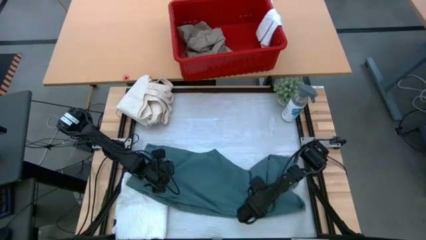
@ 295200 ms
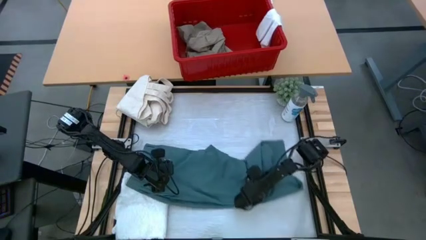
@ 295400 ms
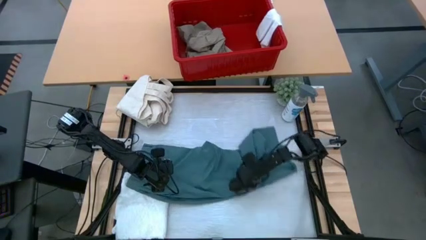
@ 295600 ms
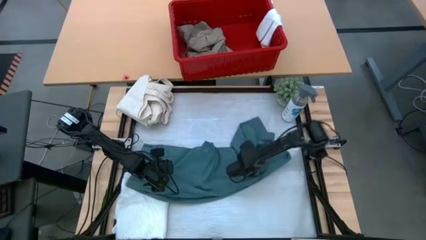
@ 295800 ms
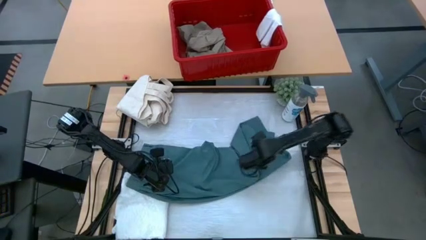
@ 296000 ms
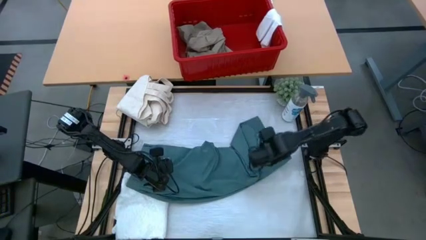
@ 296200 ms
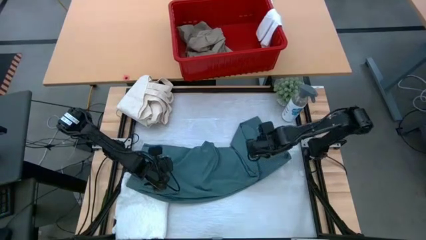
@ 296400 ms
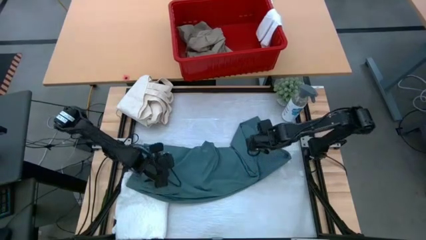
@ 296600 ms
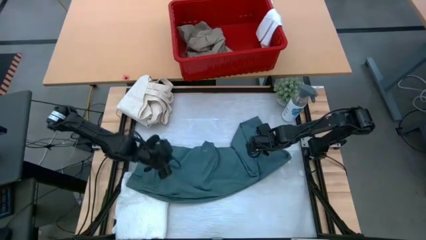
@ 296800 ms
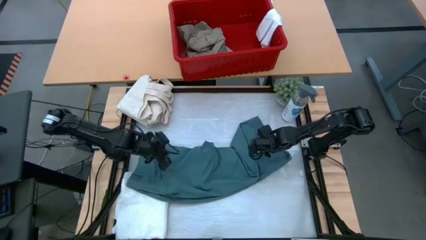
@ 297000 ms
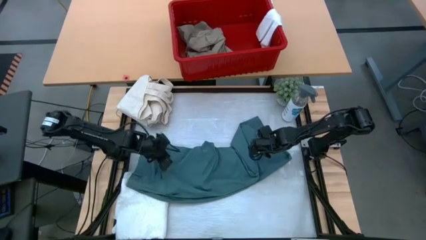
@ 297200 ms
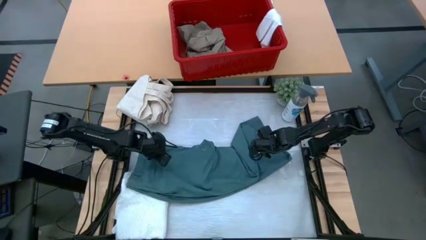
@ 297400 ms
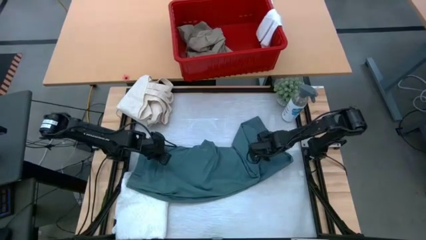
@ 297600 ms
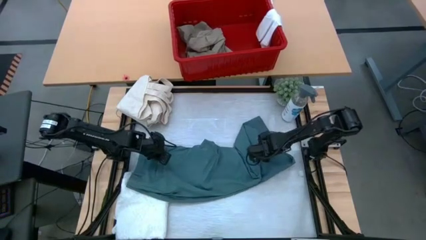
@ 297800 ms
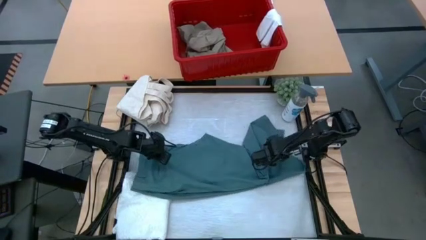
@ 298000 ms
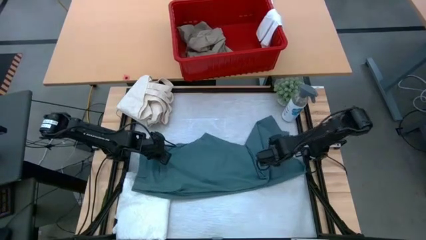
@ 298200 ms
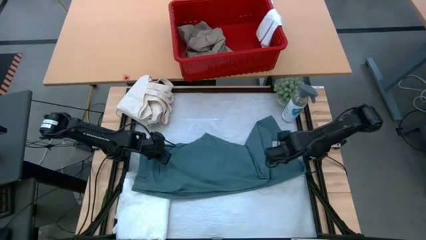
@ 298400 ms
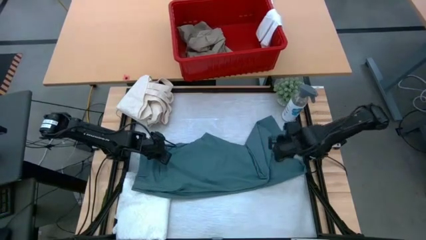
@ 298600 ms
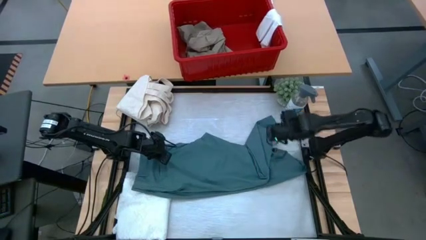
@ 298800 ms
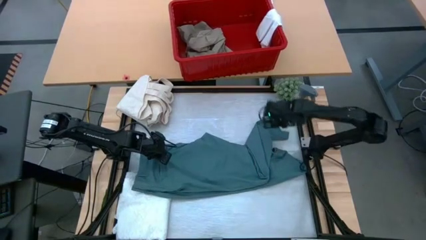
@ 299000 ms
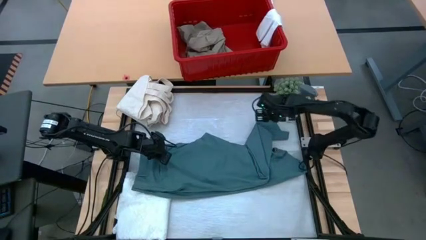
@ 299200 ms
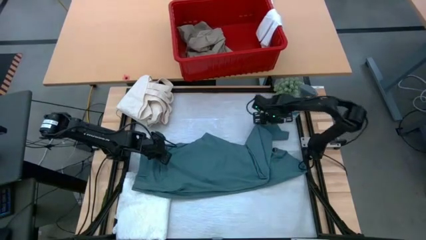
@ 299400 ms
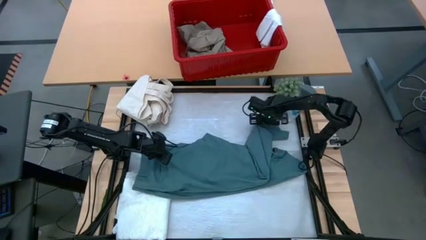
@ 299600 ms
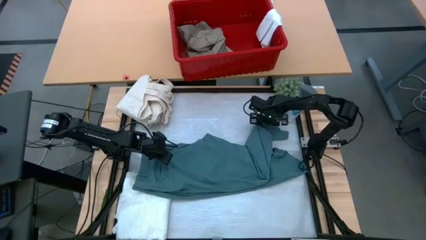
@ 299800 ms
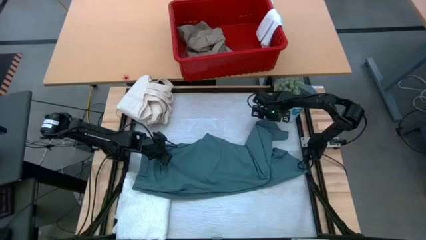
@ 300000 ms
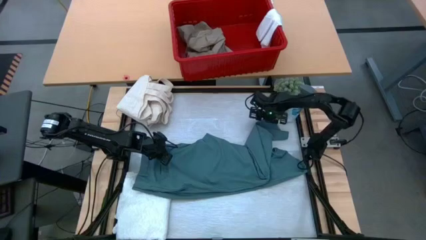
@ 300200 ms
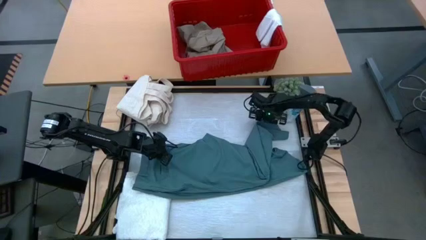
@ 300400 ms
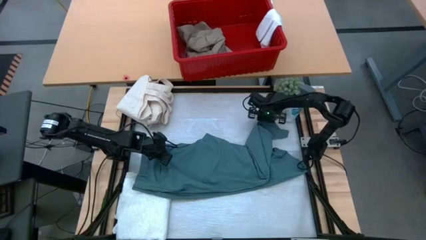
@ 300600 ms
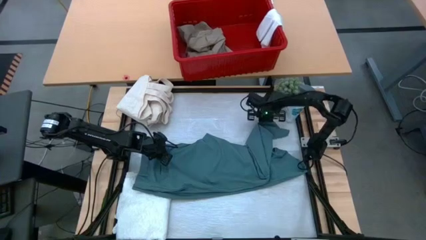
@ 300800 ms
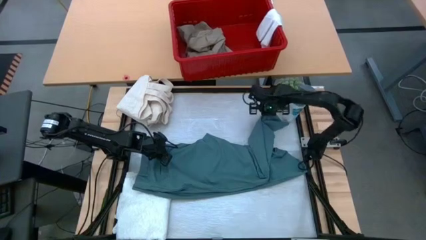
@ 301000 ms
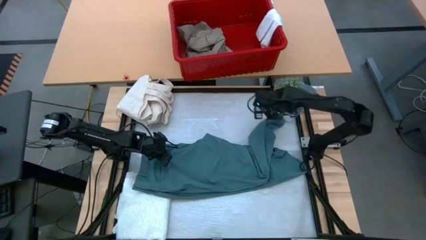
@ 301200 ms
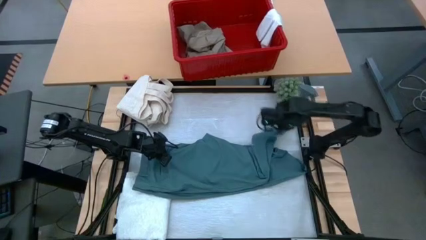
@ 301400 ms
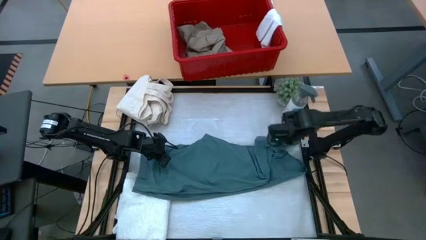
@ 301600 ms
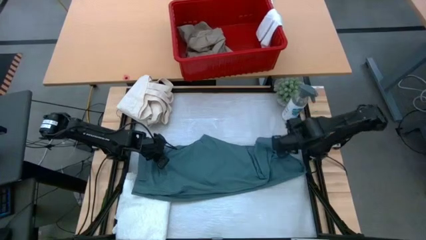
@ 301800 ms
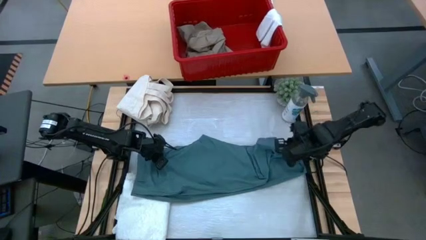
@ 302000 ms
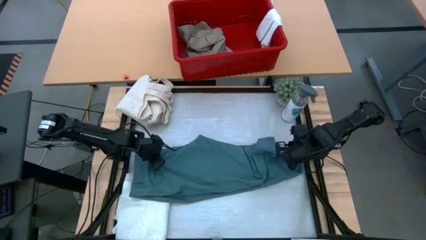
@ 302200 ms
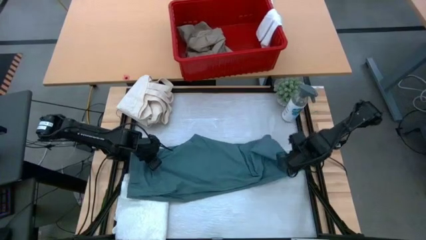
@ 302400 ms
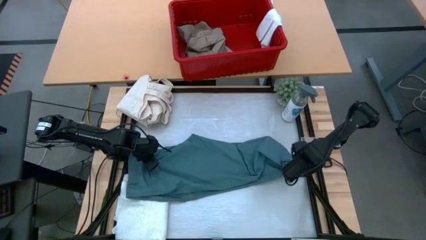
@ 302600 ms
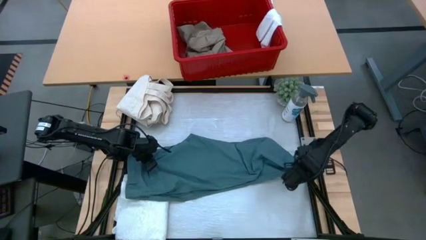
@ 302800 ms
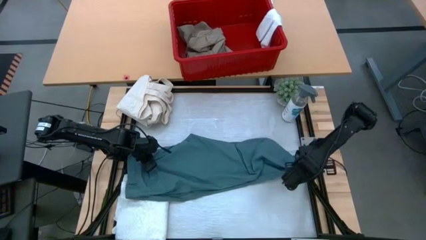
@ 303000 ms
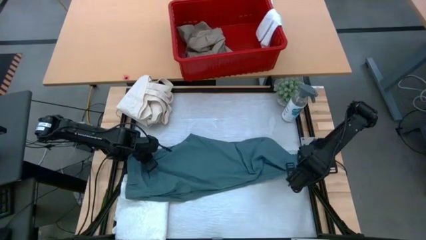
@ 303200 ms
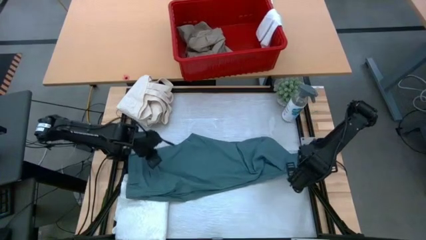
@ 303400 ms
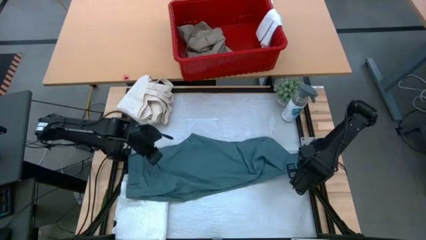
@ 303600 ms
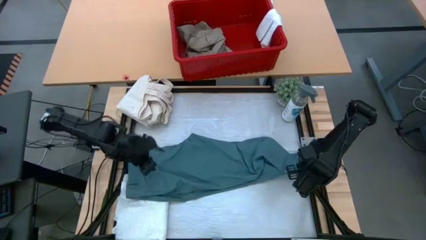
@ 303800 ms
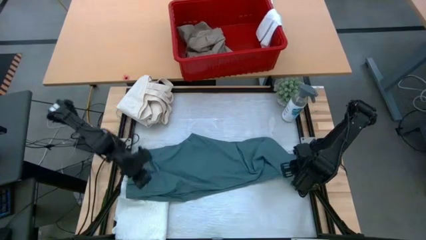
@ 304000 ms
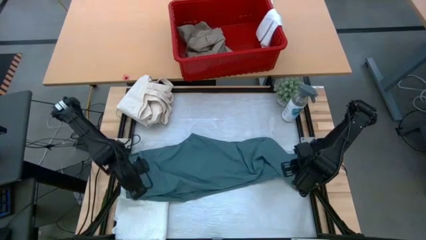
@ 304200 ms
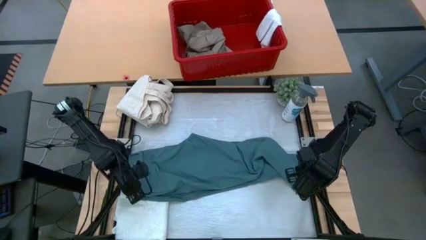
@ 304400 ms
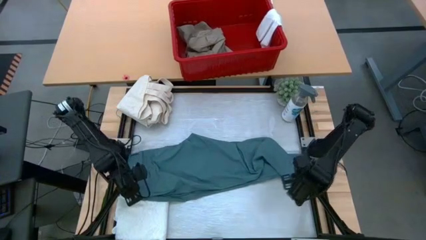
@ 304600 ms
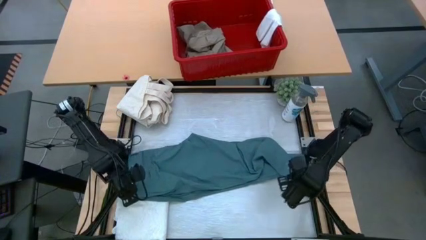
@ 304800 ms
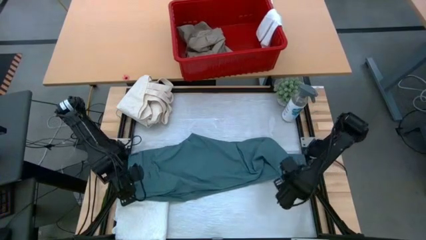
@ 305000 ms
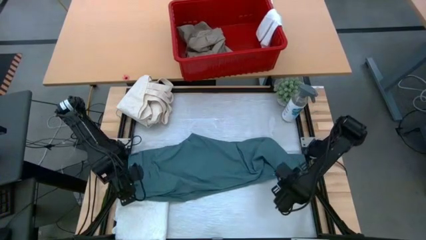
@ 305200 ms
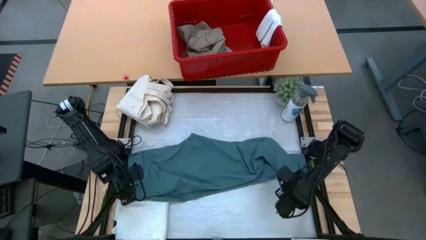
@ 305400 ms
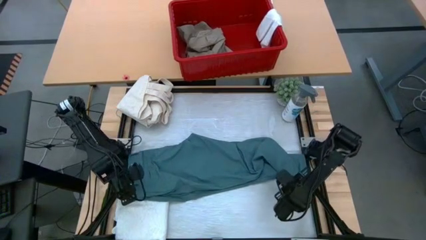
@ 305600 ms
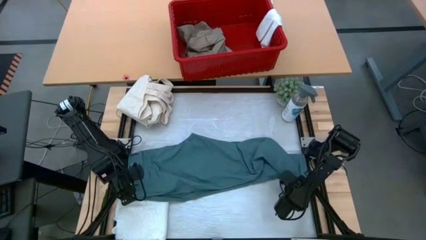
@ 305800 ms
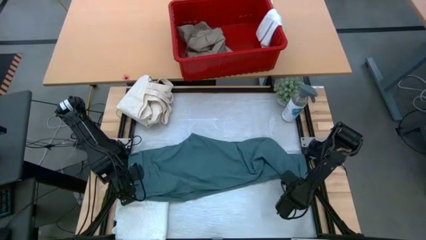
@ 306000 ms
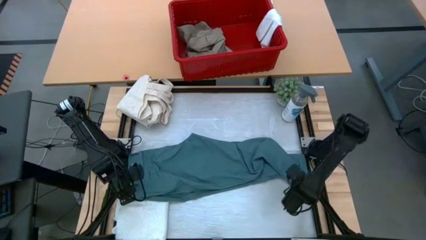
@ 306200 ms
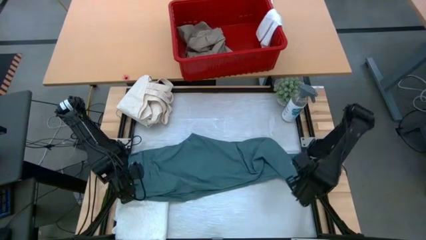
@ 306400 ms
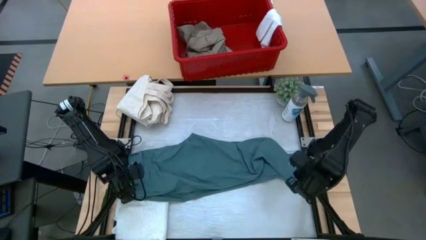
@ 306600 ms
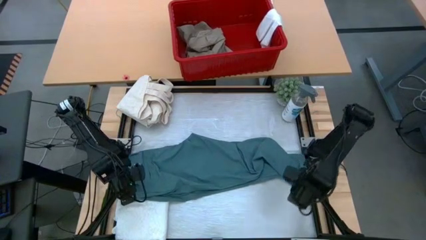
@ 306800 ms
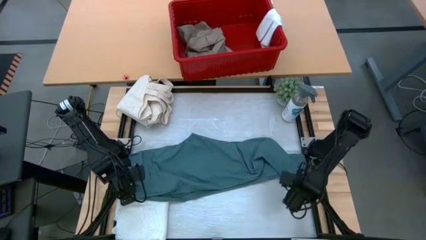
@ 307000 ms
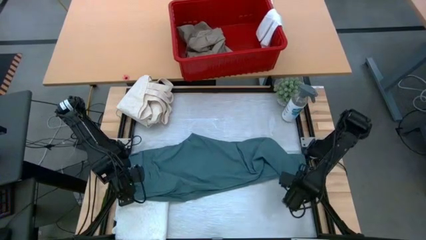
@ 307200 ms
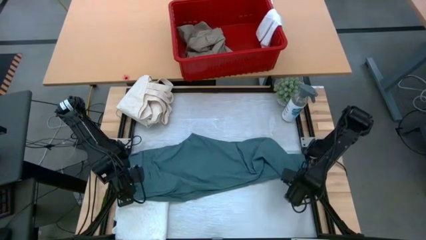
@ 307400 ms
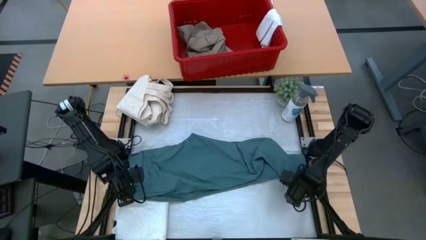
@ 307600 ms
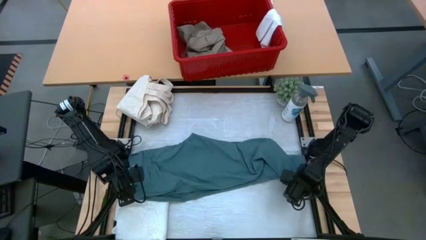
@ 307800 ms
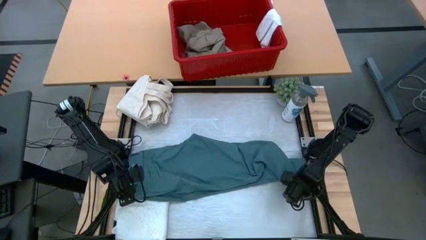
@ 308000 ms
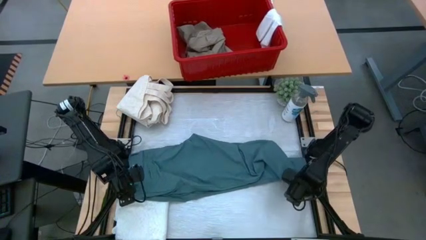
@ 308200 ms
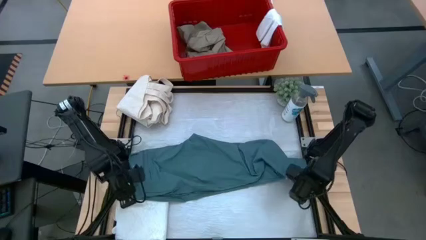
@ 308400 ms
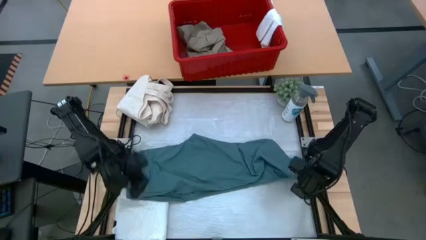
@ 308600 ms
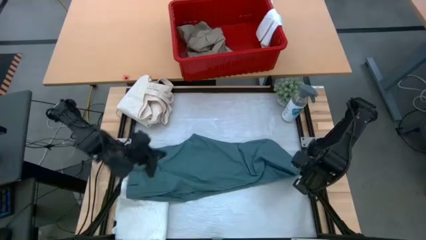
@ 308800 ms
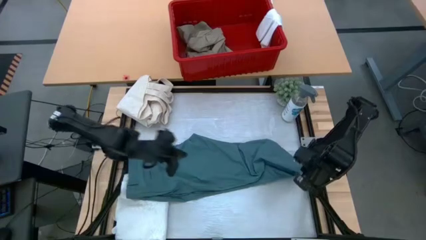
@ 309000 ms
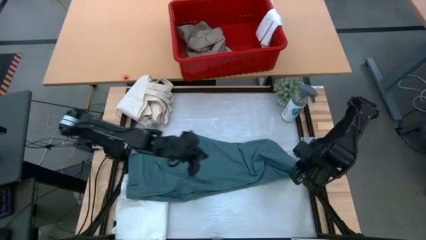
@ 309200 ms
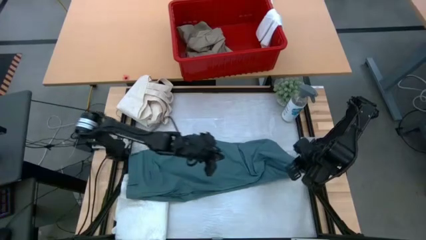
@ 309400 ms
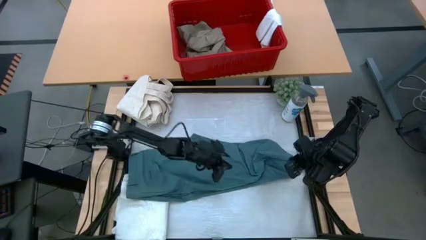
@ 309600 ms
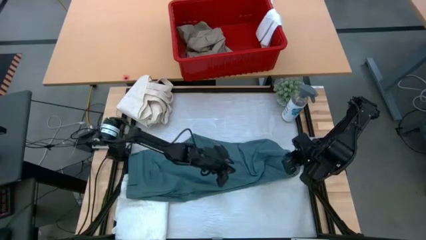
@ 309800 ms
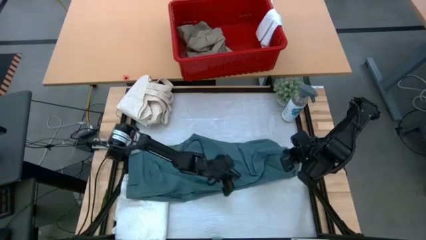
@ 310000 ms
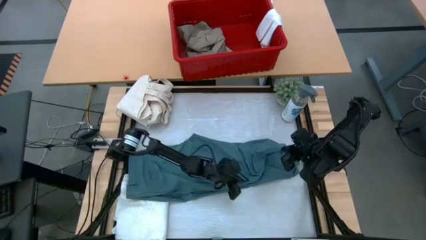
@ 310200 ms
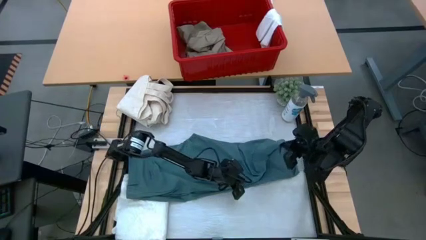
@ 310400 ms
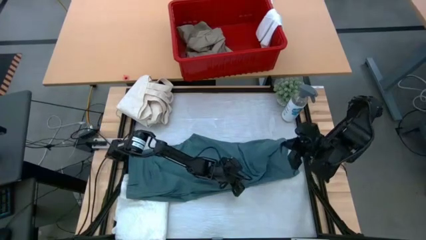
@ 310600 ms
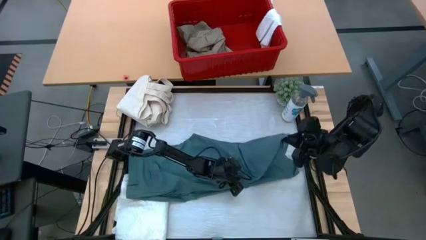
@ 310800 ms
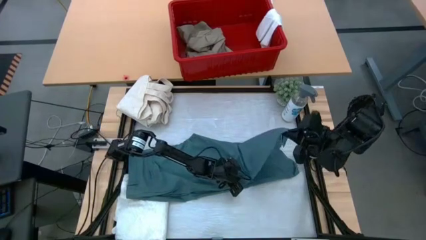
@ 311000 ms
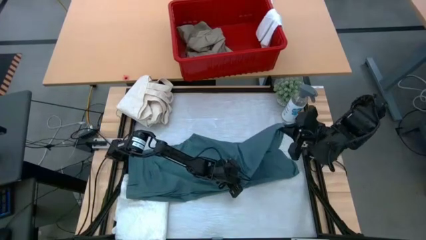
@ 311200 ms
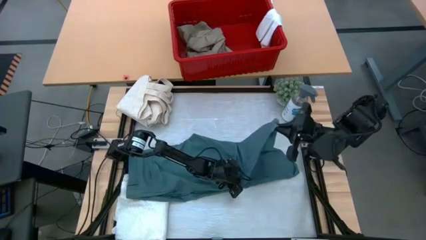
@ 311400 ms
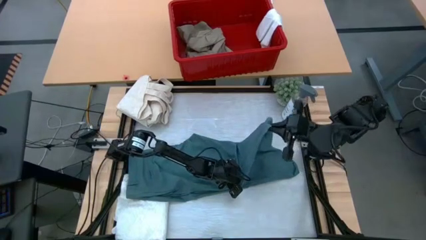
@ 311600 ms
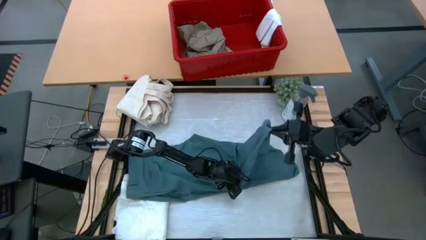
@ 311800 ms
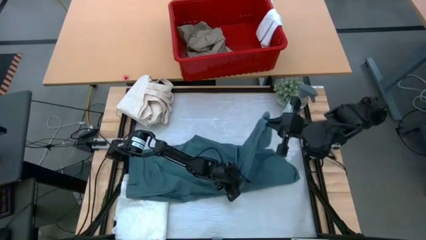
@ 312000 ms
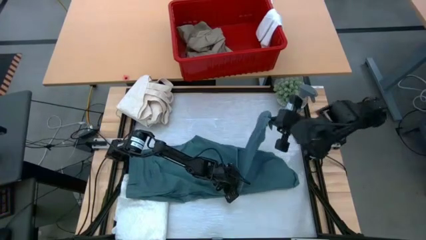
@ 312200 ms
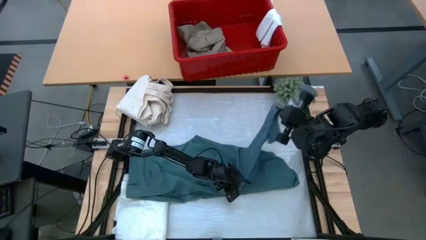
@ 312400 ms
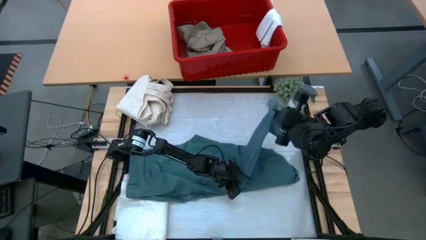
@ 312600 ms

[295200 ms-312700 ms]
Task: Fold Laundry from Bin
Fold the blue pants
